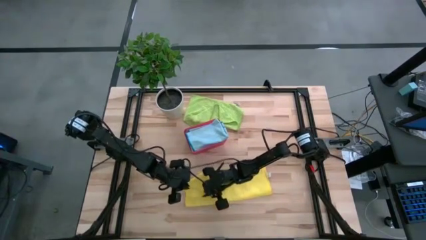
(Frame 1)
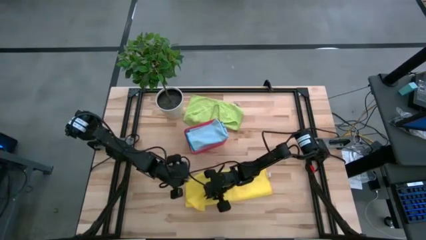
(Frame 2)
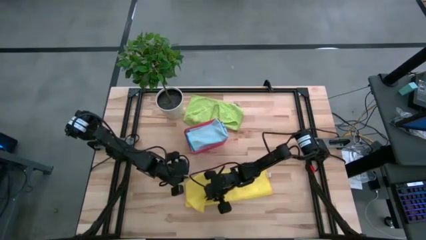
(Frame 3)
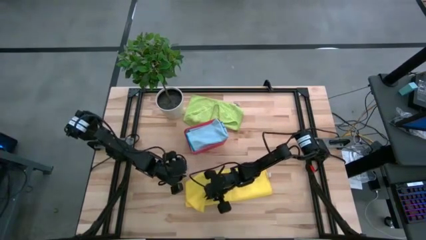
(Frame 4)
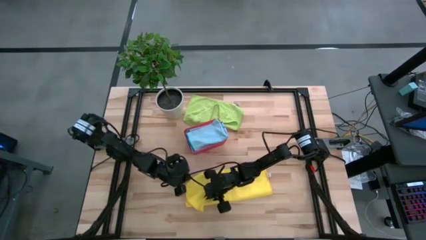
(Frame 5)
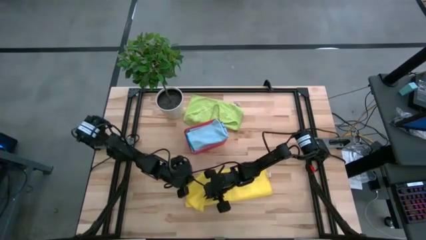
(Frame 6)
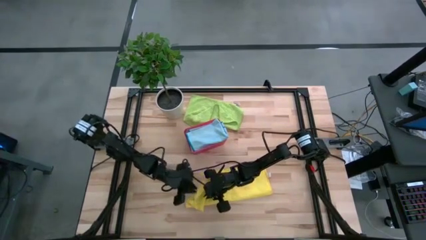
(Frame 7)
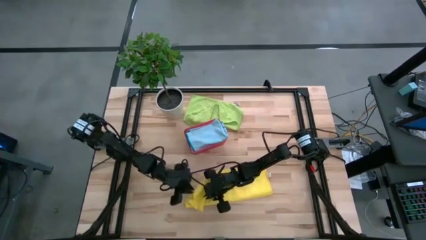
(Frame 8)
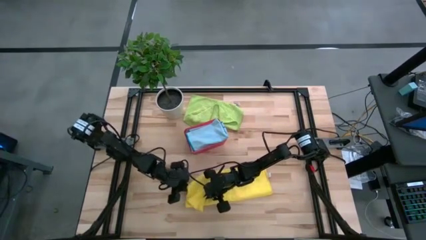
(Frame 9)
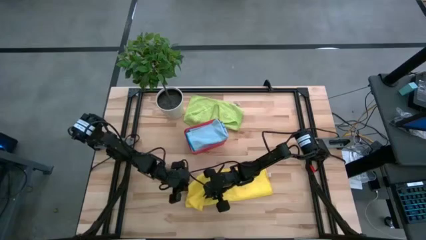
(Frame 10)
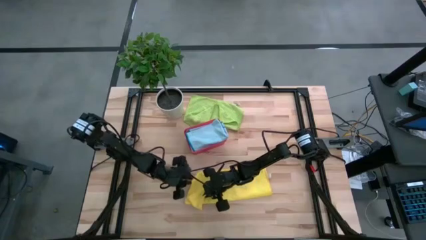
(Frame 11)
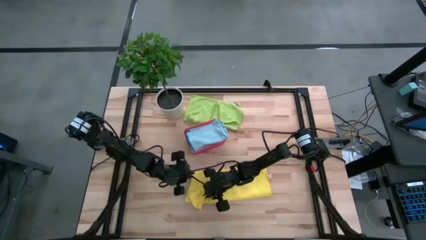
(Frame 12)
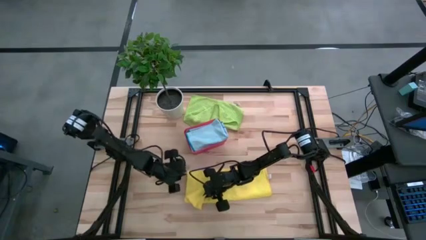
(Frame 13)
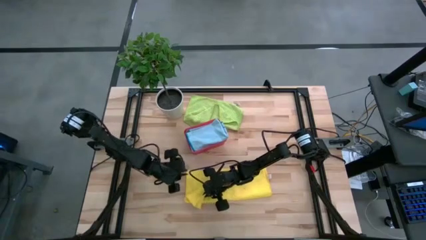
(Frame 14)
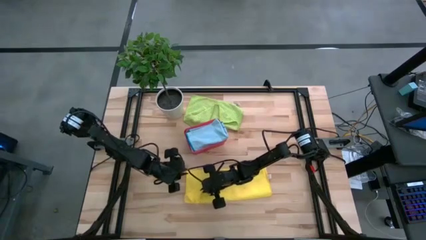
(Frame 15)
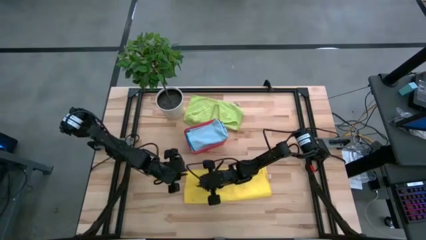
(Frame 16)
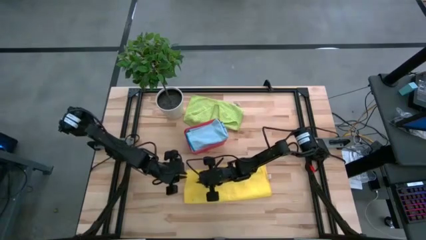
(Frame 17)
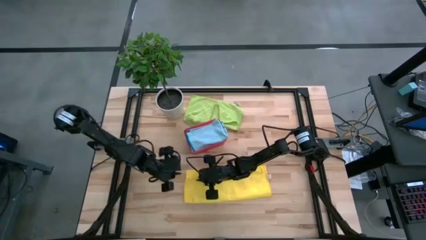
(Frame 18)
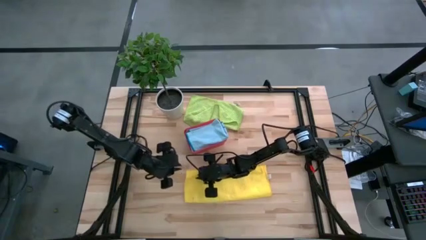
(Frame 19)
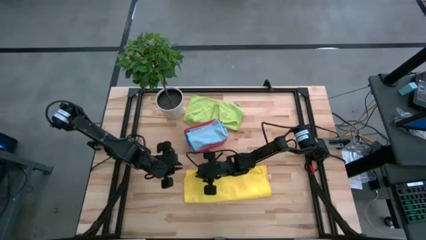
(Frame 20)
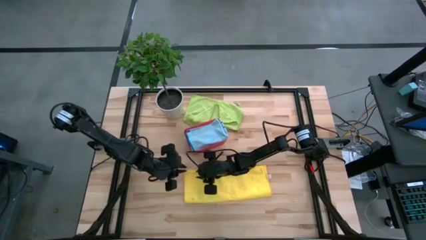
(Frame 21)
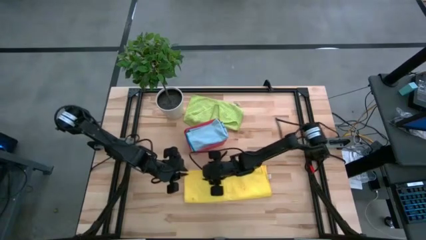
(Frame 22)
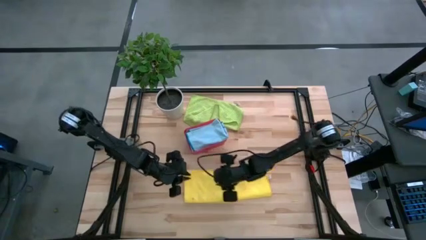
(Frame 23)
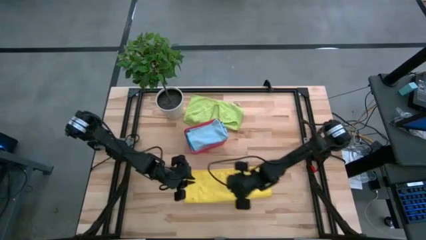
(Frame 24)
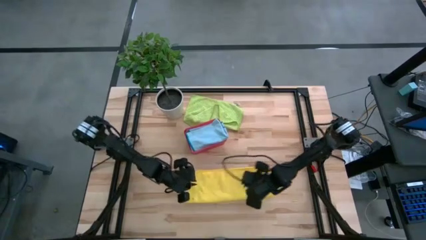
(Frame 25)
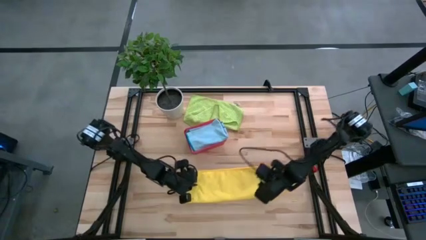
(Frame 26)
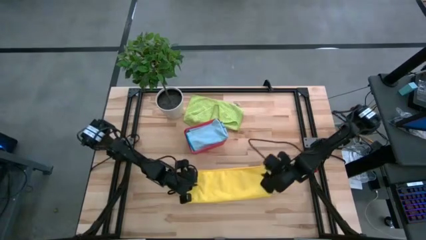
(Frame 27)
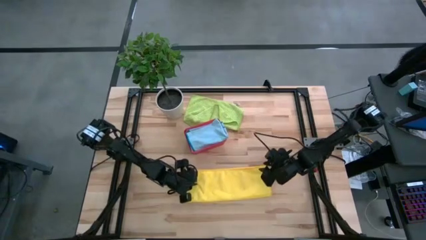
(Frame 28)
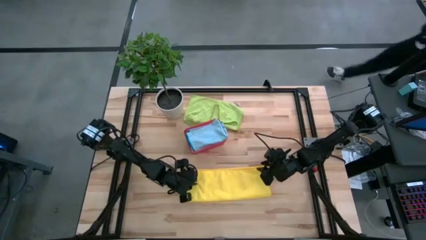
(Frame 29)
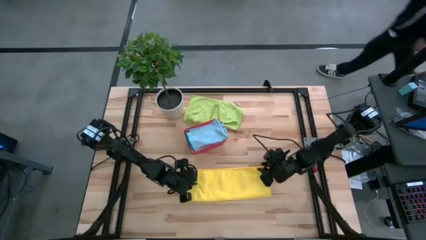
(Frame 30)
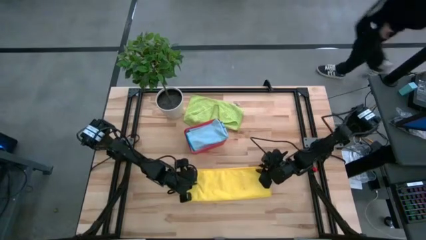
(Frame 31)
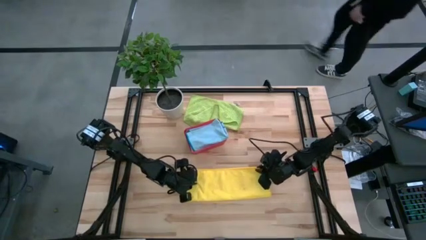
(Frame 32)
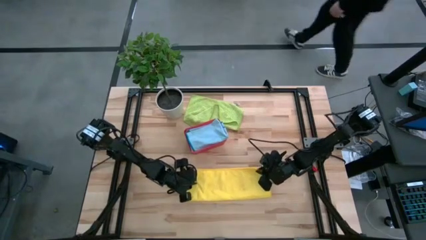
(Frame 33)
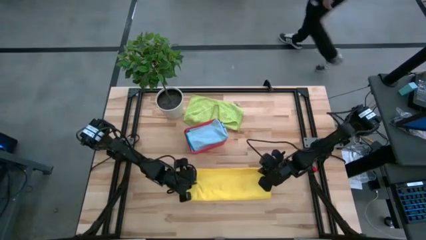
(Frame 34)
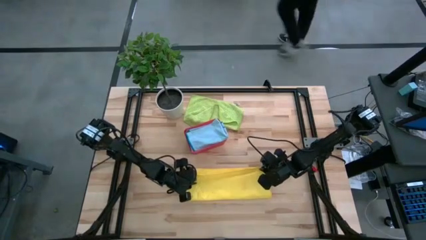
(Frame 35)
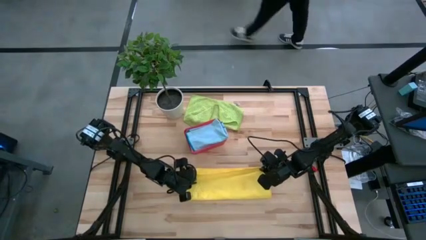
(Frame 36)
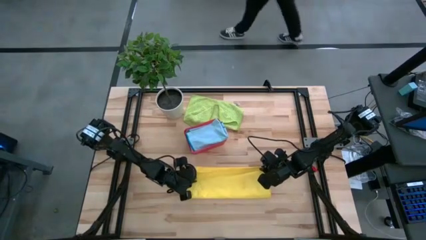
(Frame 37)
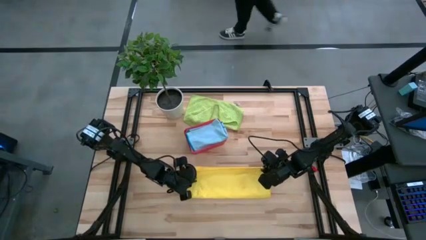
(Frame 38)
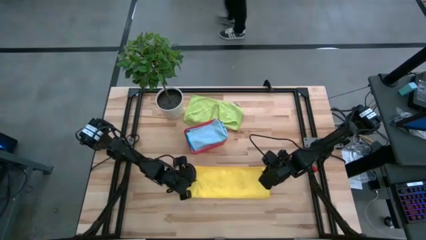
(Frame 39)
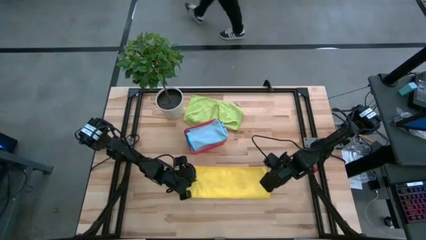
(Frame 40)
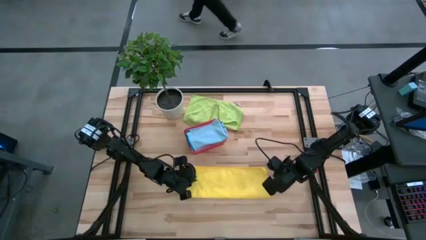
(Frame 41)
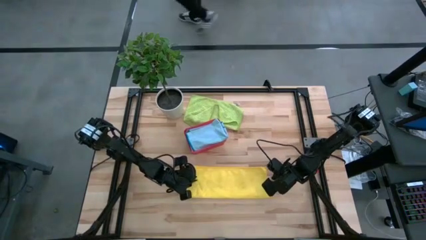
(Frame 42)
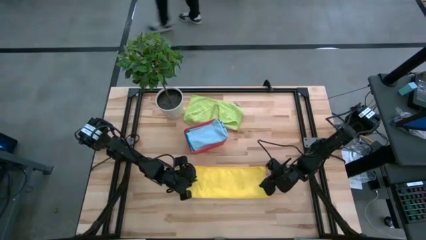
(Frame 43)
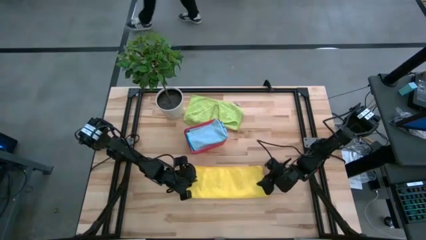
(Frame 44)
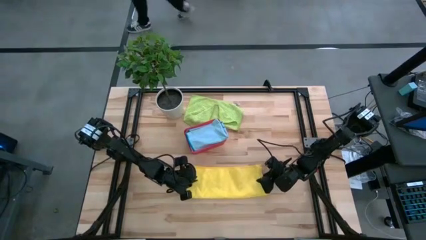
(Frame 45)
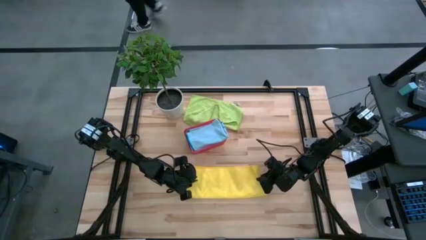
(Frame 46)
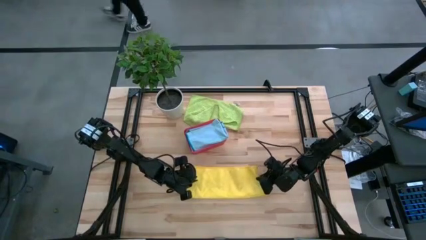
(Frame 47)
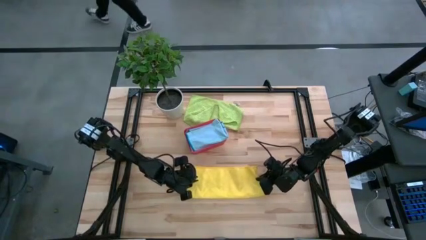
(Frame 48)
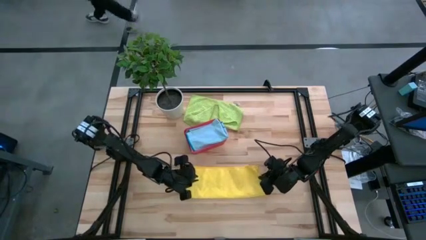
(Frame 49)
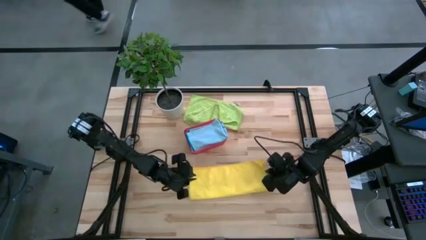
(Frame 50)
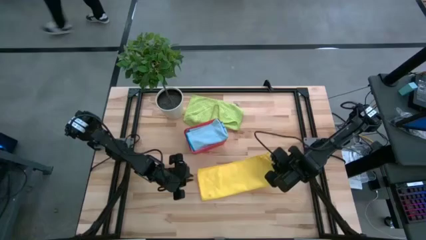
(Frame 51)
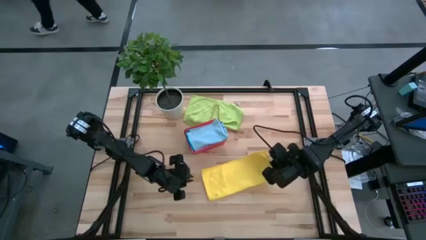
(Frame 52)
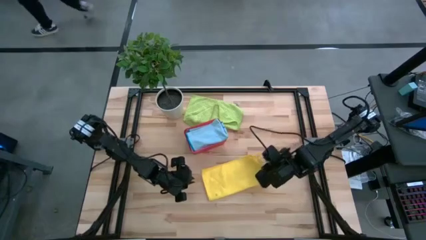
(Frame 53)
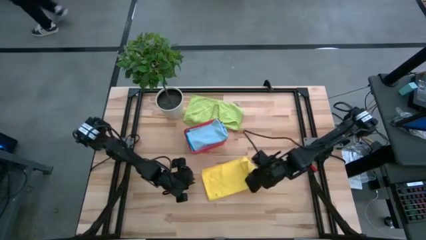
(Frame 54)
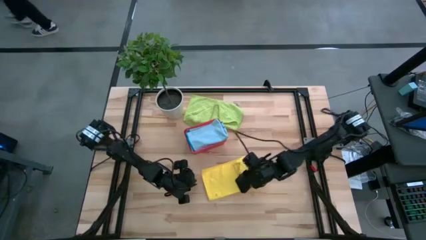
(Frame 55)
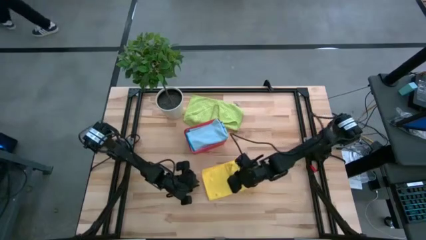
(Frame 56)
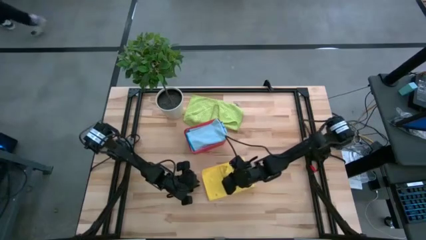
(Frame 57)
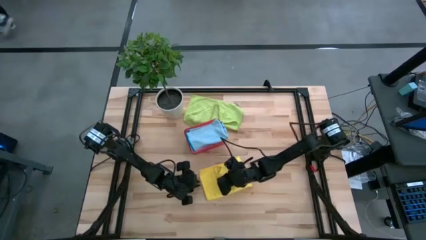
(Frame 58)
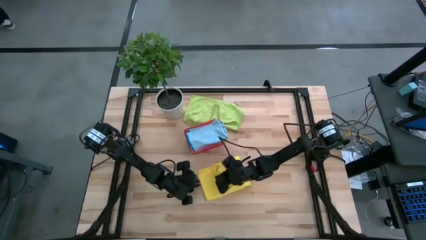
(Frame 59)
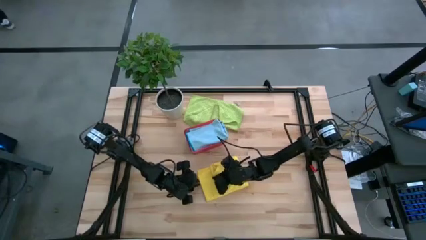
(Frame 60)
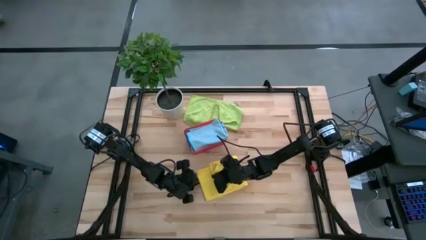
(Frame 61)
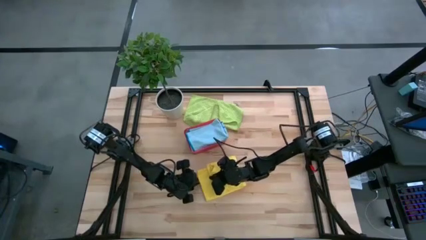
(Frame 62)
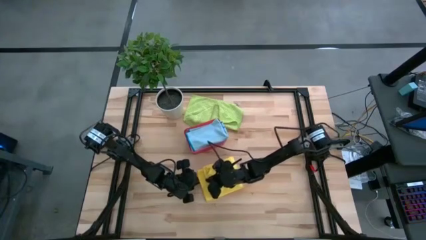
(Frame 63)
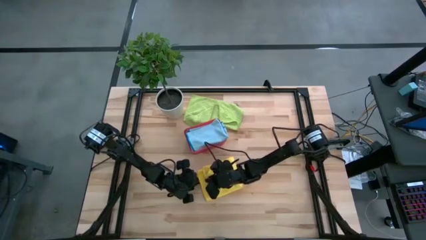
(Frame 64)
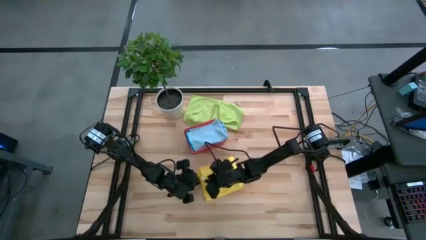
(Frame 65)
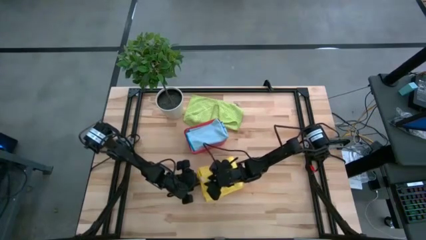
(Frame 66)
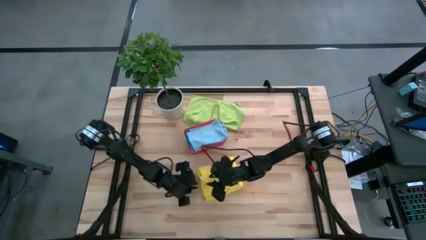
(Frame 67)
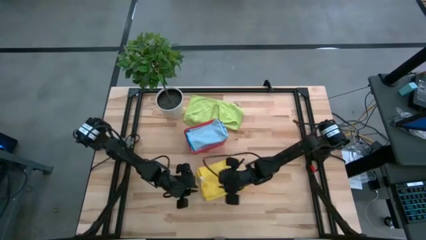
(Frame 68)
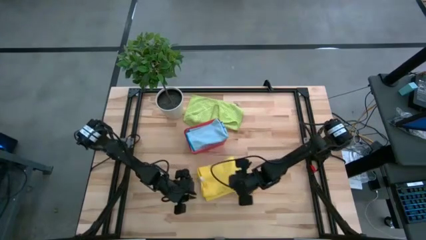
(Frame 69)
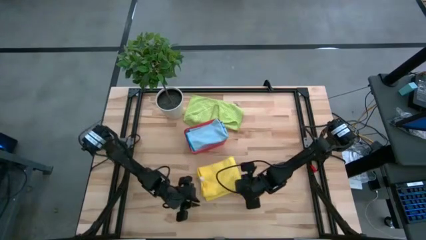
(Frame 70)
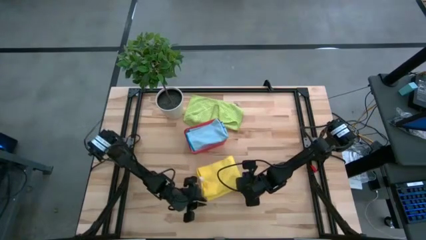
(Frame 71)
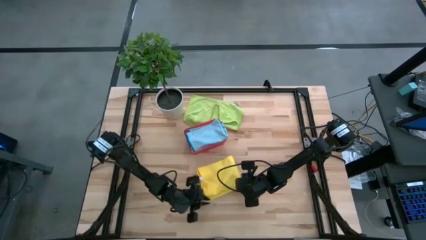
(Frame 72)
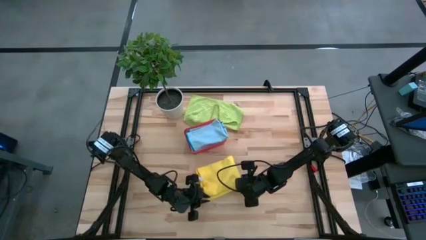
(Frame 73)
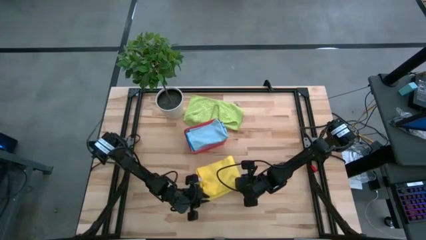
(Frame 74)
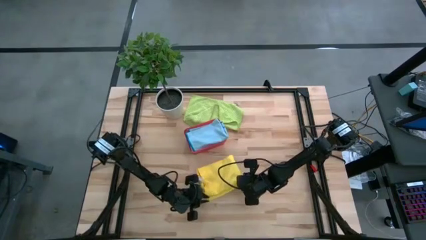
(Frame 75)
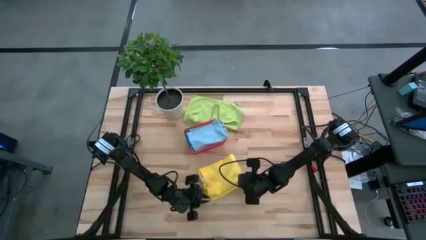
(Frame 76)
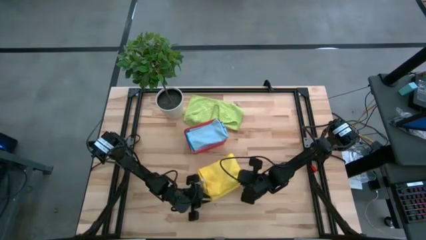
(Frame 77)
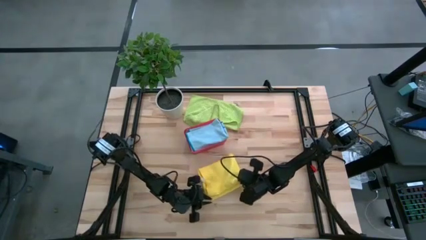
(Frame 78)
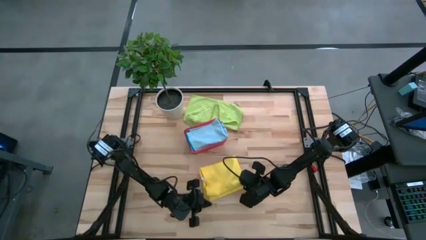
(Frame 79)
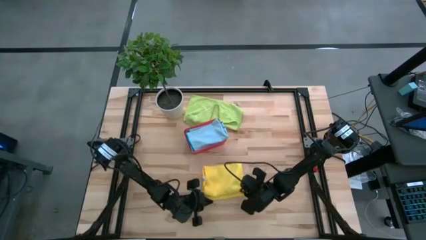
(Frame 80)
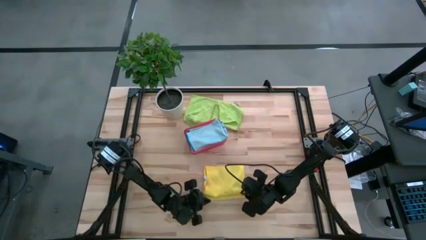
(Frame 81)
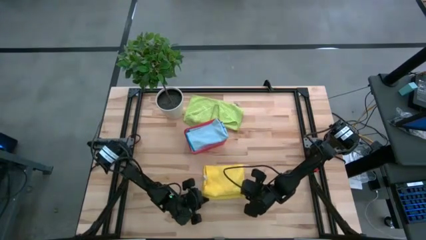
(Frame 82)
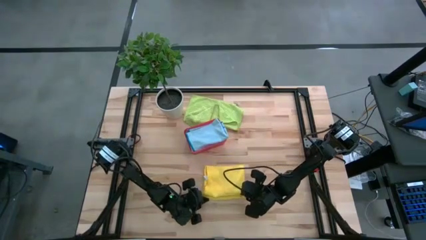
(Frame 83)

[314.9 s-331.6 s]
Task: Fold microfiber towels
Fold the yellow microfiber cloth
